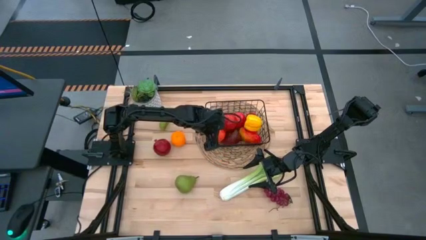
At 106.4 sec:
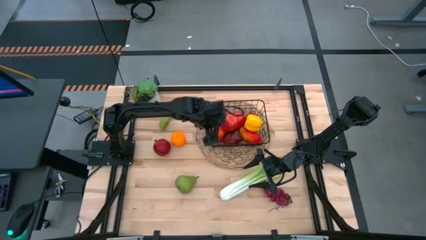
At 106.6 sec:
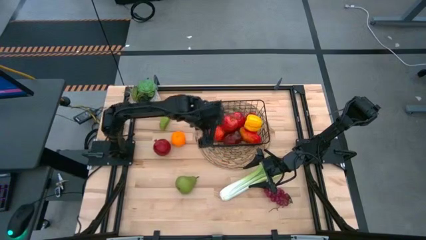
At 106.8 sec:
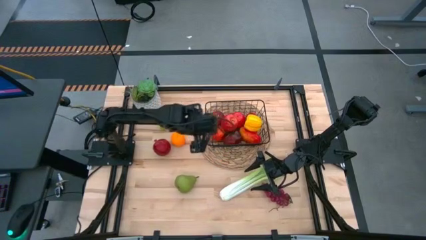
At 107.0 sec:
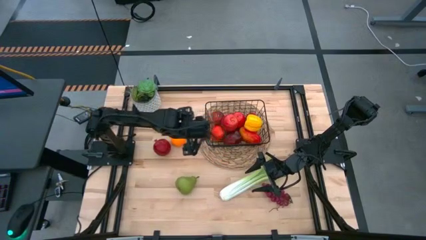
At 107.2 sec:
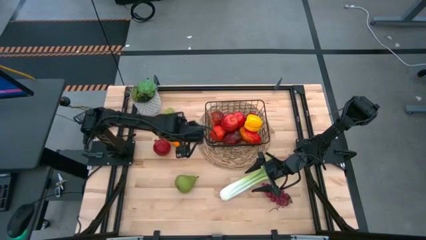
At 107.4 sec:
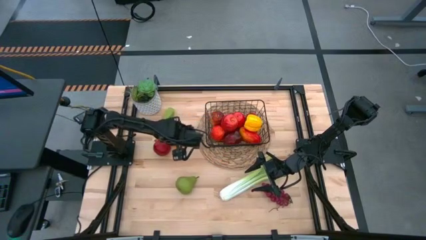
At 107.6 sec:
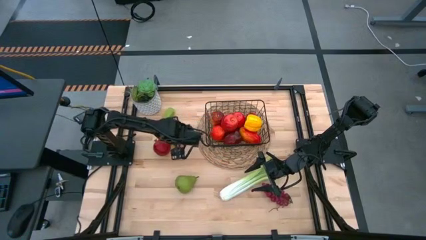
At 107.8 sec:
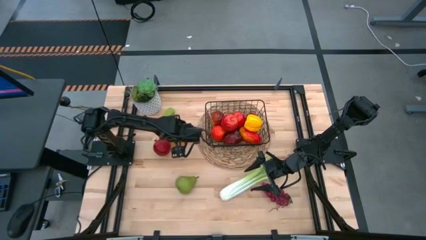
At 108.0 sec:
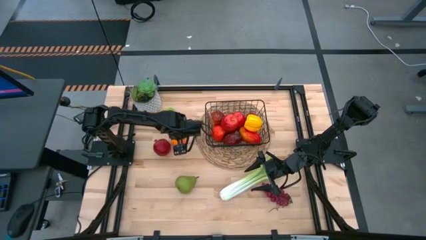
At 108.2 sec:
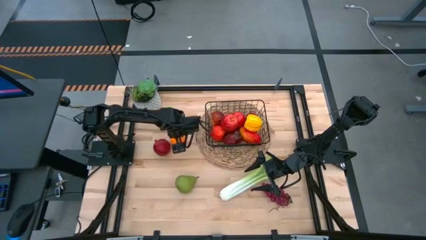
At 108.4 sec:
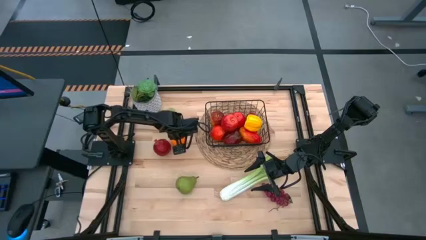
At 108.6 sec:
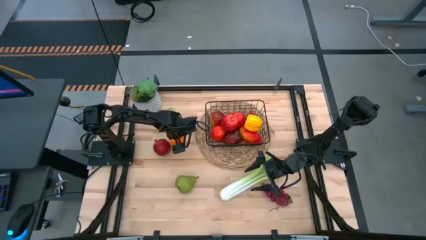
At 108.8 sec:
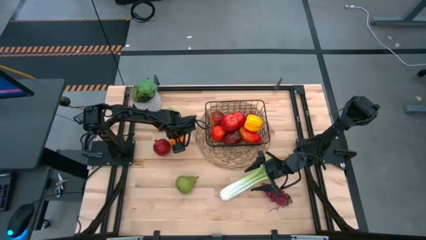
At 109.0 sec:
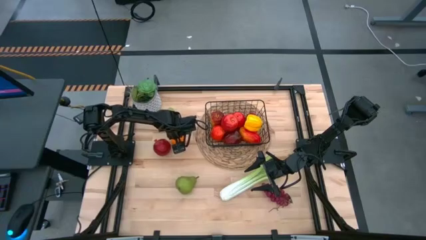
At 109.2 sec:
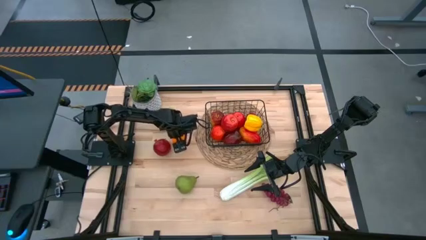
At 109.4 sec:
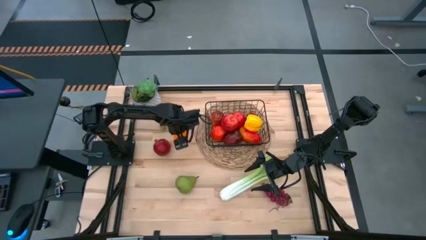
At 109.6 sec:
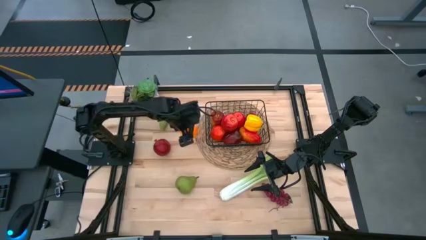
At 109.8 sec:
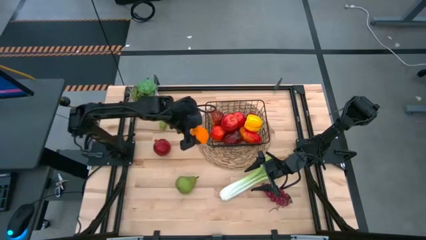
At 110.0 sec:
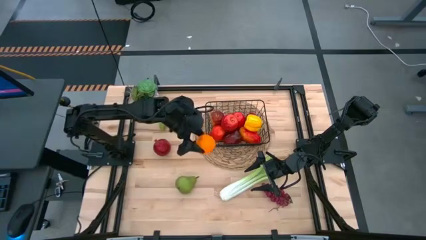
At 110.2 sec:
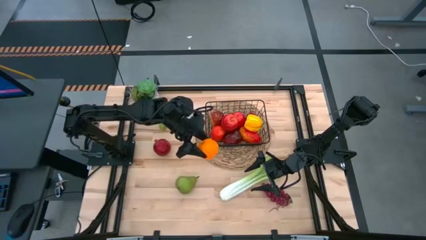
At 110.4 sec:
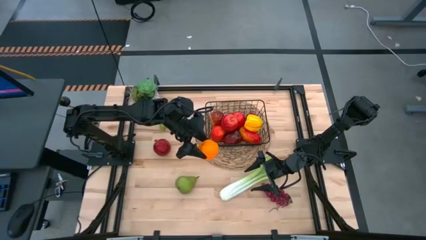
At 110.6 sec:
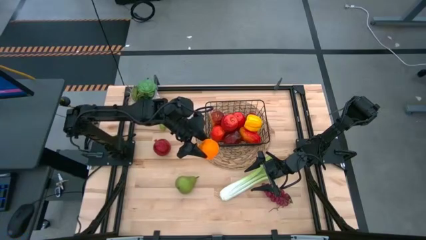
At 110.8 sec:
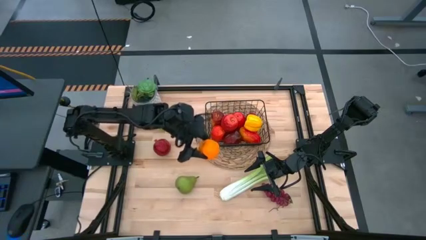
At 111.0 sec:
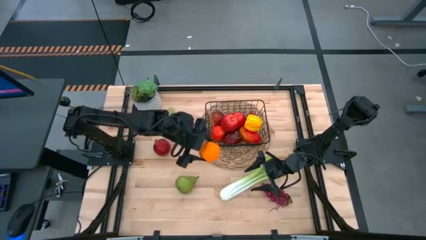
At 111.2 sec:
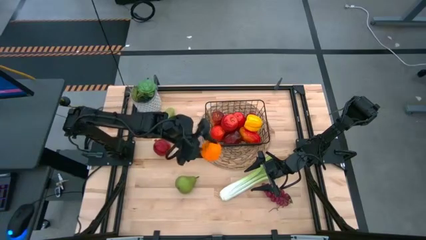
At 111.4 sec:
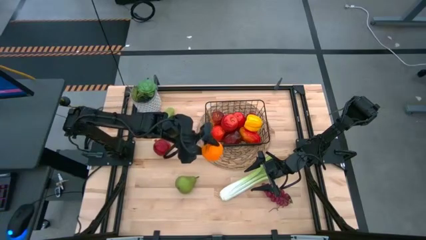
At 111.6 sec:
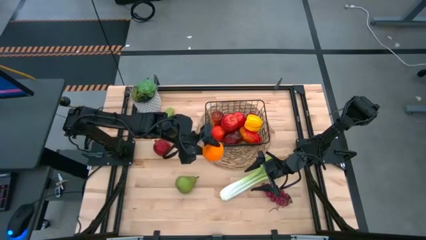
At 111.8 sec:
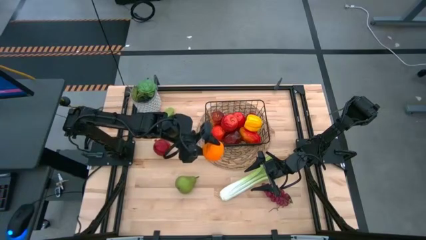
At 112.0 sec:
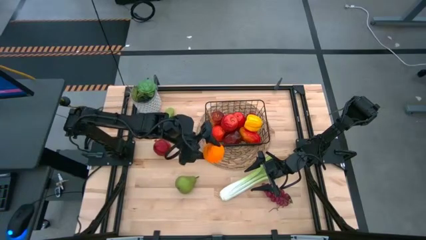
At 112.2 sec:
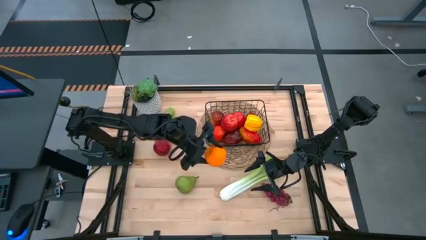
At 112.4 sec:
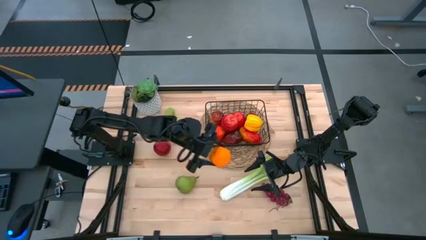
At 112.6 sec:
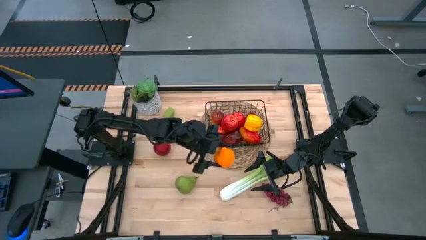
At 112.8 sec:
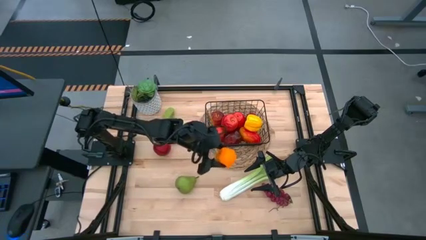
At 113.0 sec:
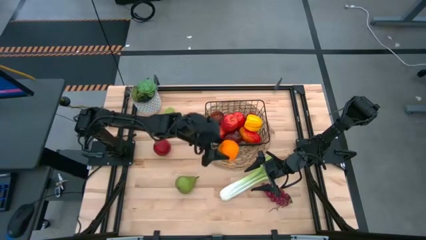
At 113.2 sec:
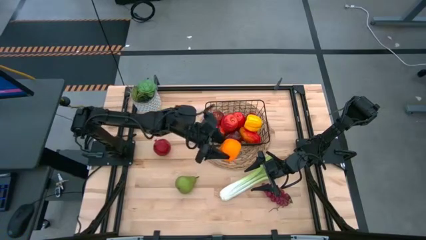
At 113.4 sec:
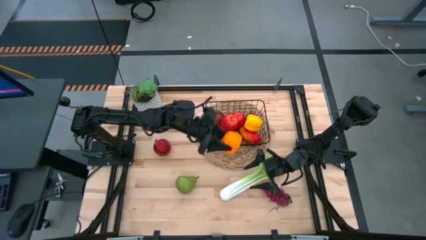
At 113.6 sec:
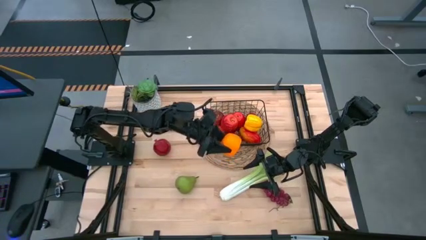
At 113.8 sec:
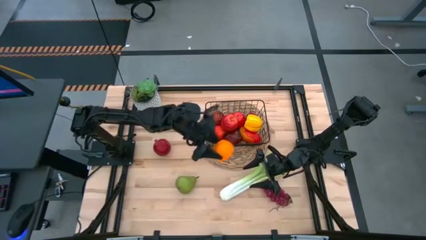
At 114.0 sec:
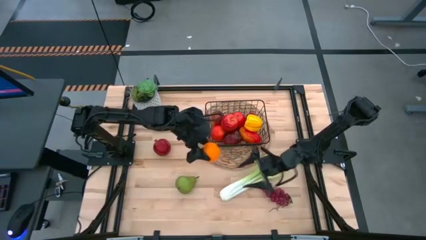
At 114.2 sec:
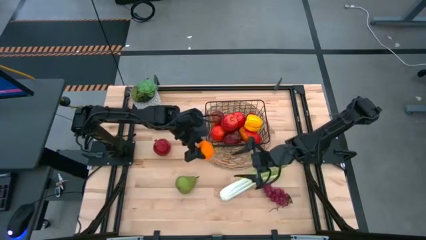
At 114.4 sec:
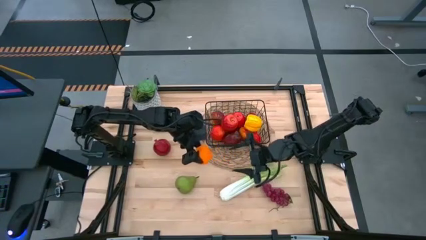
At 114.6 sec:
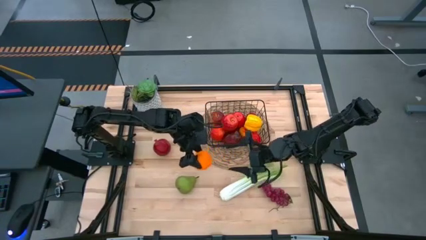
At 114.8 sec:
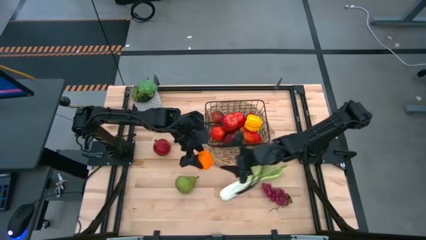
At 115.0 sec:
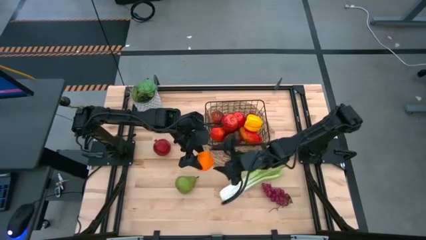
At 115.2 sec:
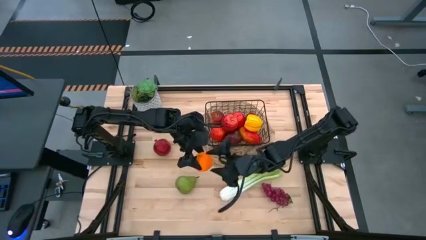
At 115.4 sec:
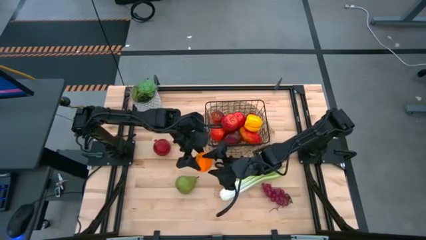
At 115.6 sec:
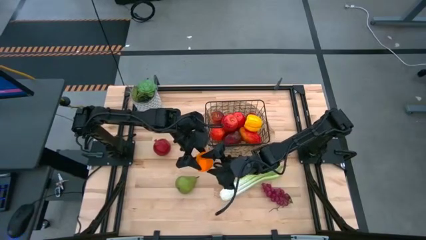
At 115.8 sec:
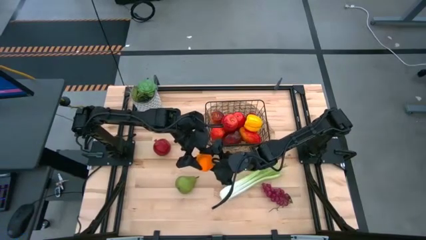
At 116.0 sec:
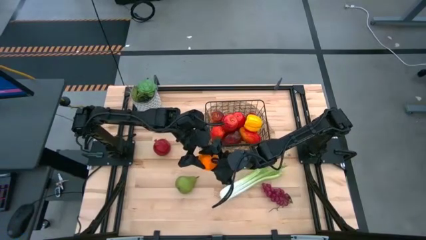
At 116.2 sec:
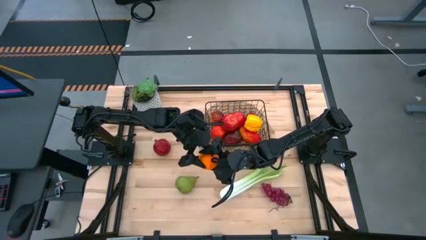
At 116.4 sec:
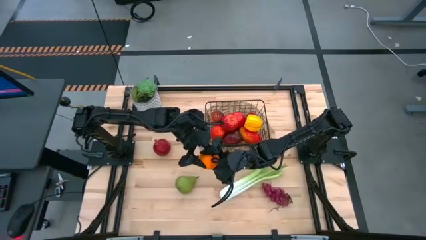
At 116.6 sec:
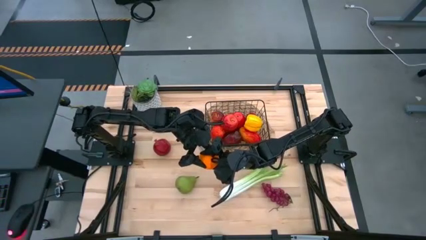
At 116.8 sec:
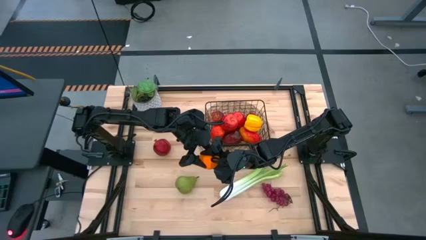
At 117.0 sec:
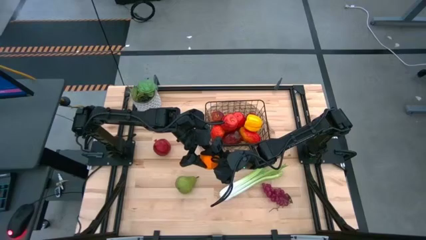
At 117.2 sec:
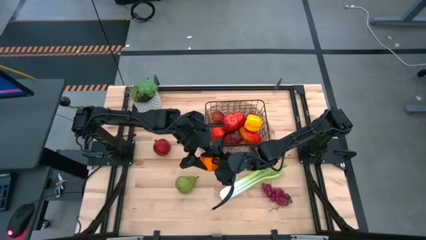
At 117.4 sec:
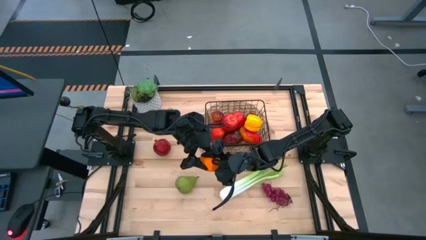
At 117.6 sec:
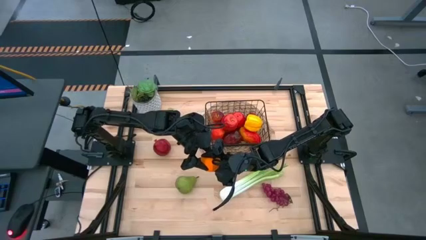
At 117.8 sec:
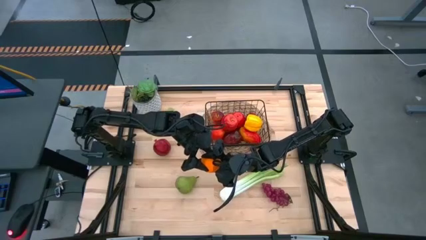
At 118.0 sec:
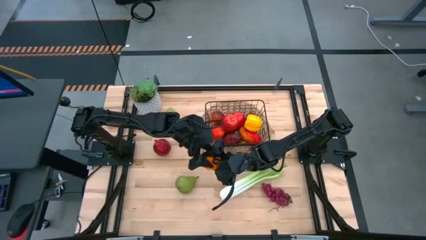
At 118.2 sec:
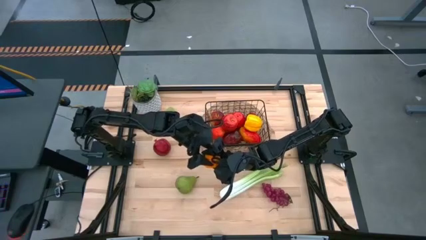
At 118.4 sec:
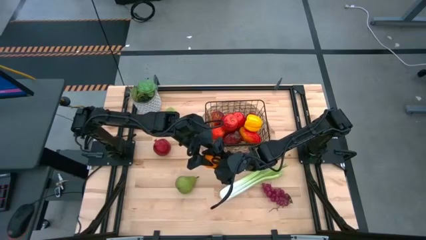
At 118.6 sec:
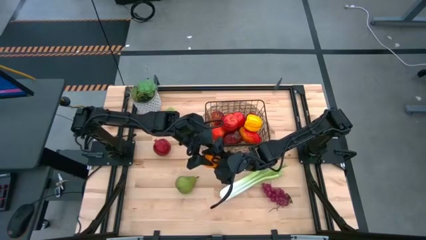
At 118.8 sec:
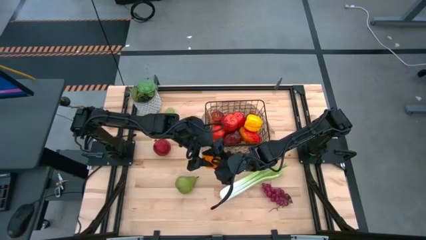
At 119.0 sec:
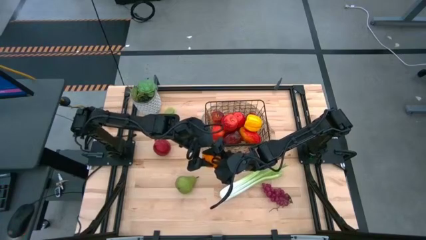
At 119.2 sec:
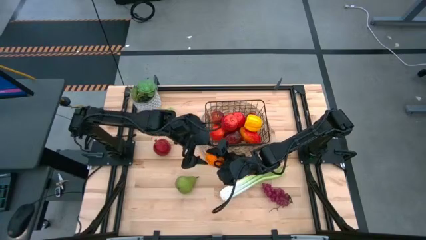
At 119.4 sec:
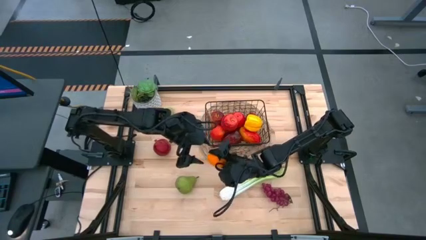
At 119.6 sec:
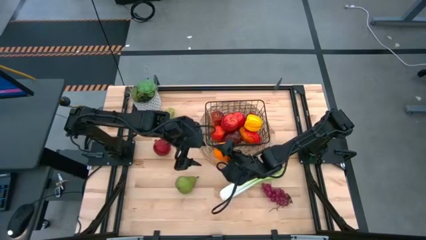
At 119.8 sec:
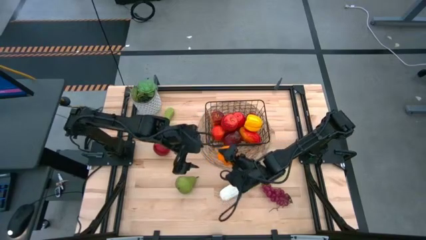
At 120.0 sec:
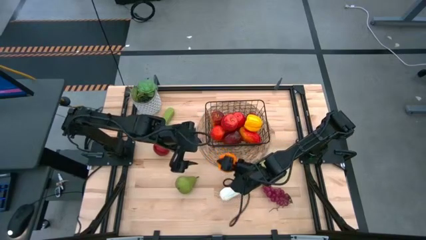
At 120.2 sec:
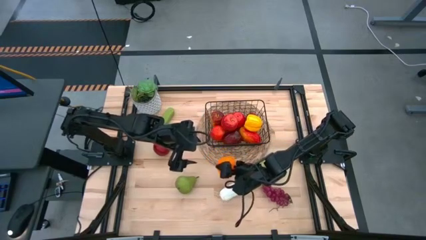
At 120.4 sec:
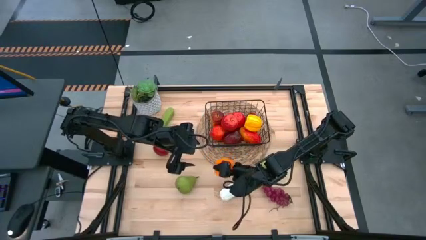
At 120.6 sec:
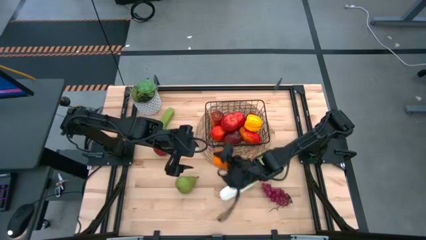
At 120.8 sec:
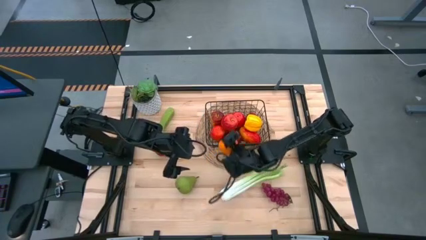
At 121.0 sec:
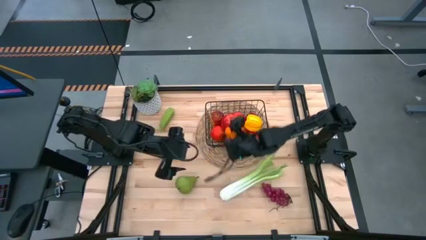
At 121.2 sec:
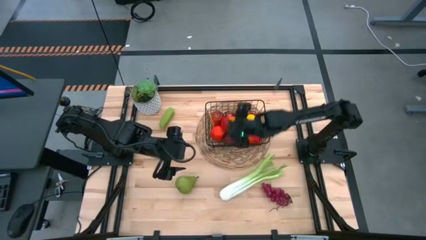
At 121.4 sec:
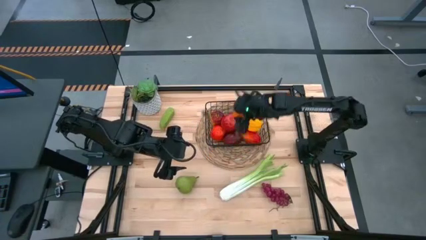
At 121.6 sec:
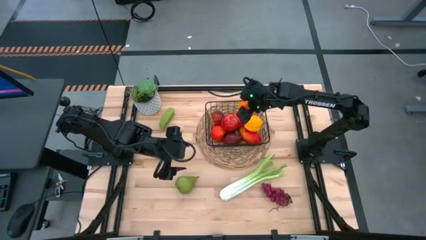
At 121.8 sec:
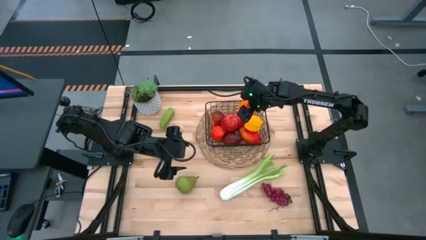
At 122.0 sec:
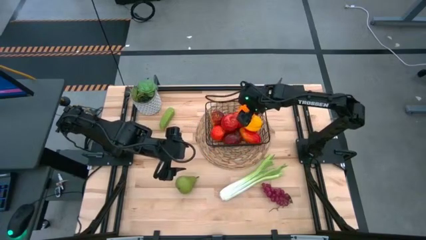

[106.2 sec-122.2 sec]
Task: Build produce basket
Put the orange into the black wire basket

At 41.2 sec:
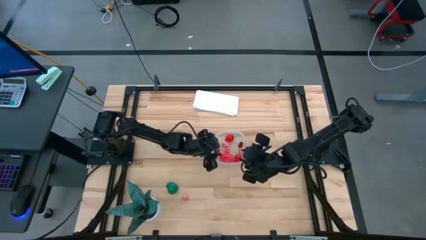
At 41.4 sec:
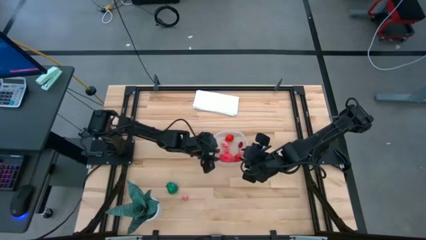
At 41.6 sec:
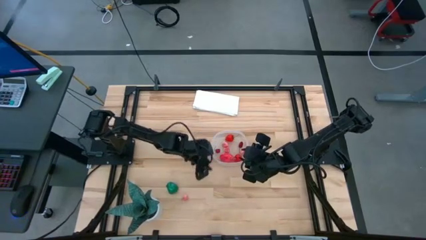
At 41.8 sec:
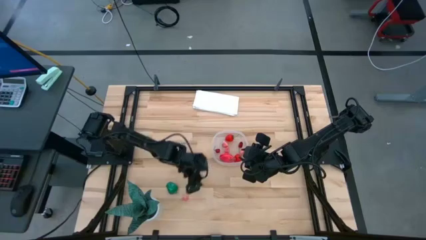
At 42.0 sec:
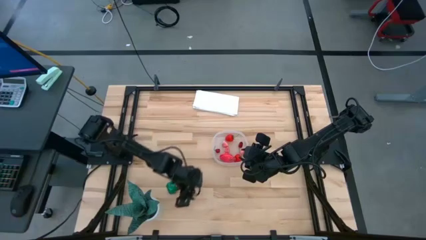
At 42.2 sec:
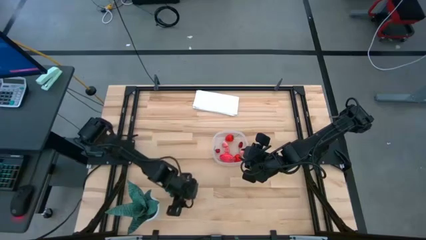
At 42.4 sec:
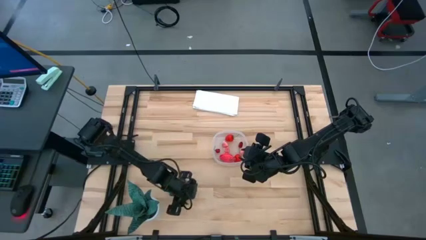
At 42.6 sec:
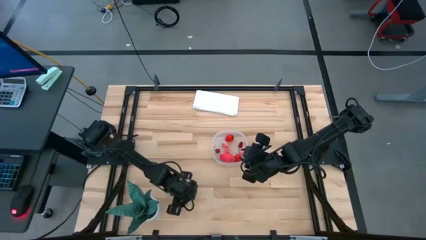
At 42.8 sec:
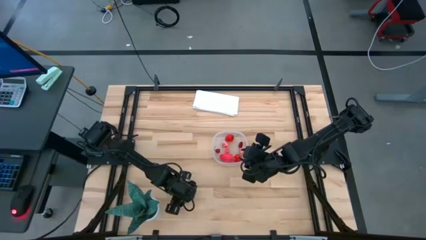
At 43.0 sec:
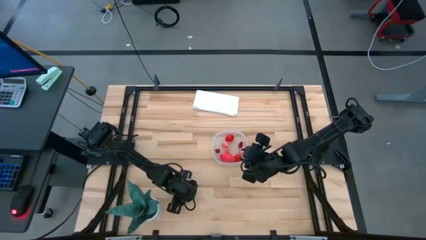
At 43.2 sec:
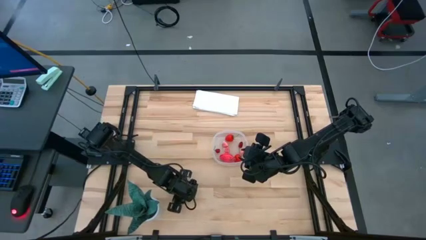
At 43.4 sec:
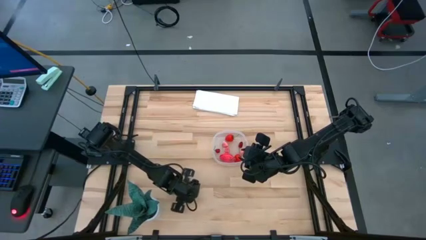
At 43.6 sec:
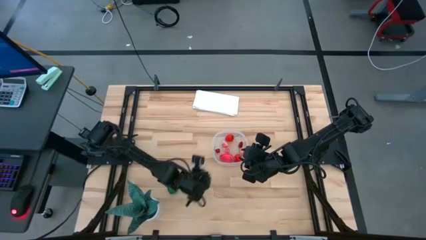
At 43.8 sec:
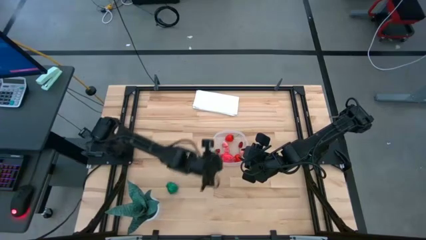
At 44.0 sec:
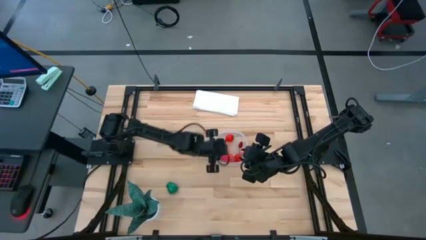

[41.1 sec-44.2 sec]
Task: Pick and placing Produce into tupperware
Put the pink peach into the transparent bin
